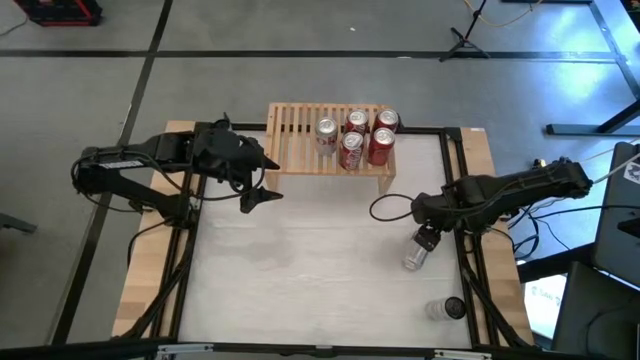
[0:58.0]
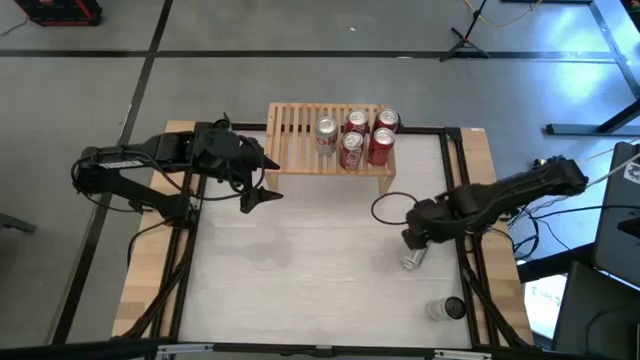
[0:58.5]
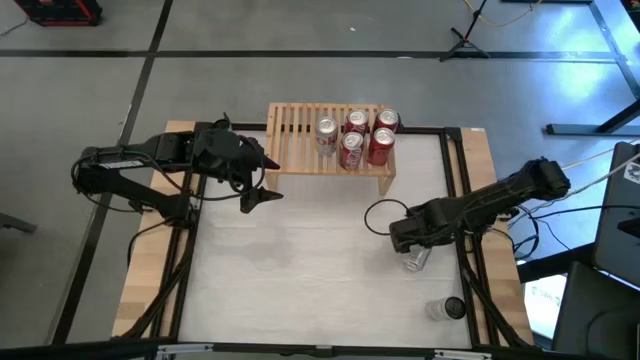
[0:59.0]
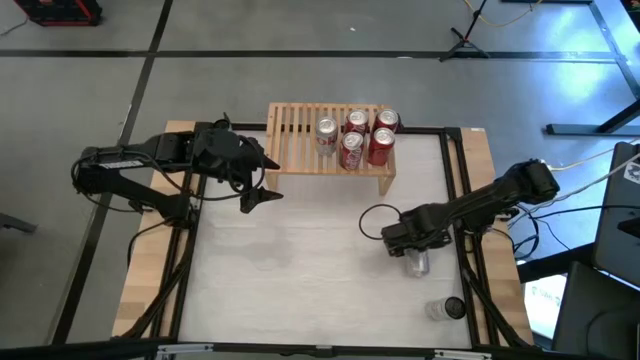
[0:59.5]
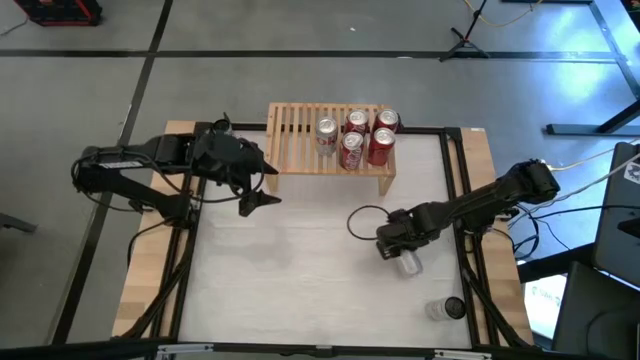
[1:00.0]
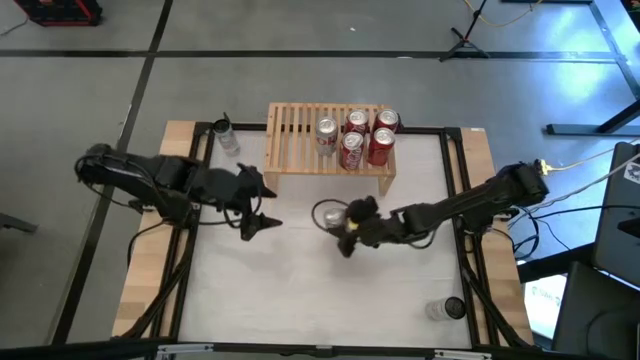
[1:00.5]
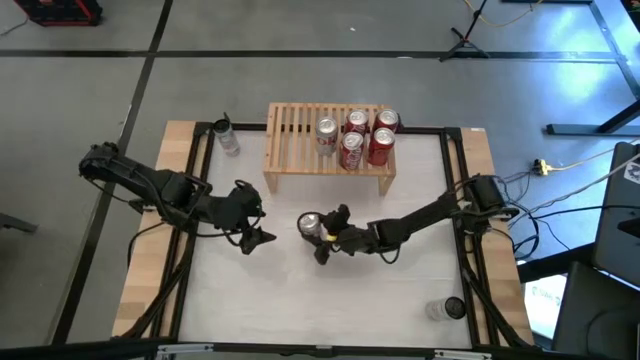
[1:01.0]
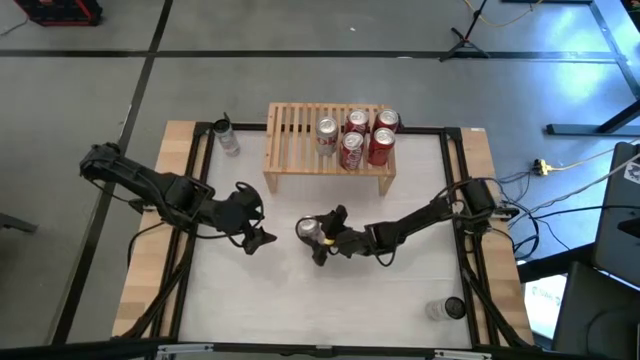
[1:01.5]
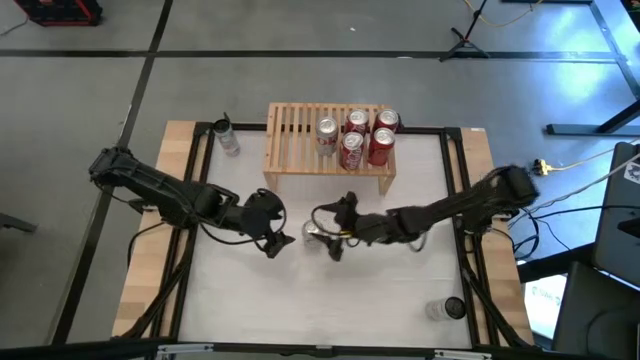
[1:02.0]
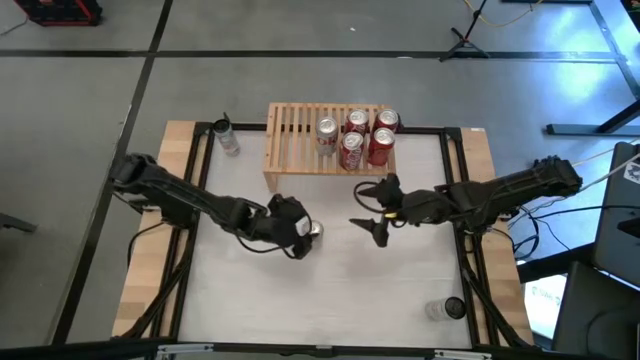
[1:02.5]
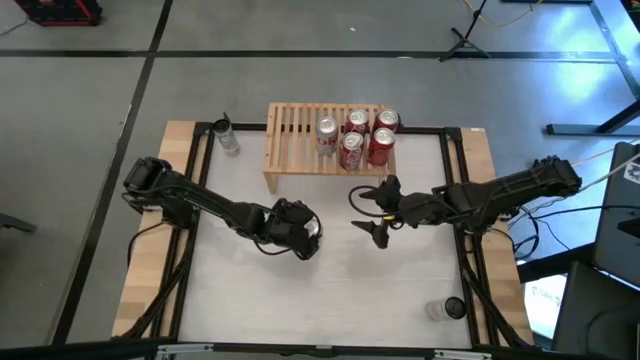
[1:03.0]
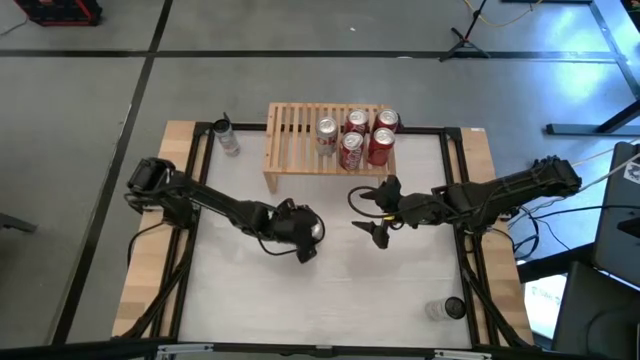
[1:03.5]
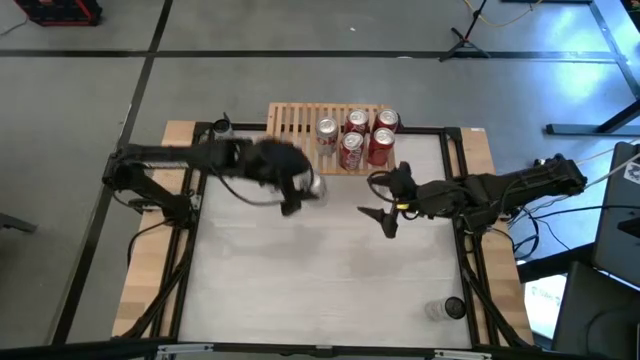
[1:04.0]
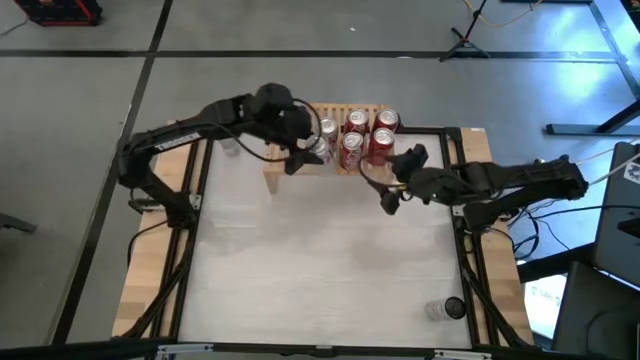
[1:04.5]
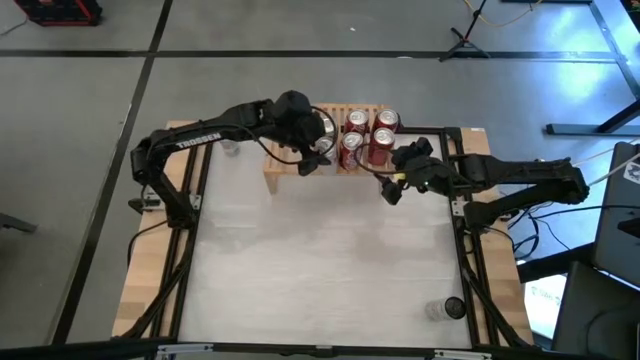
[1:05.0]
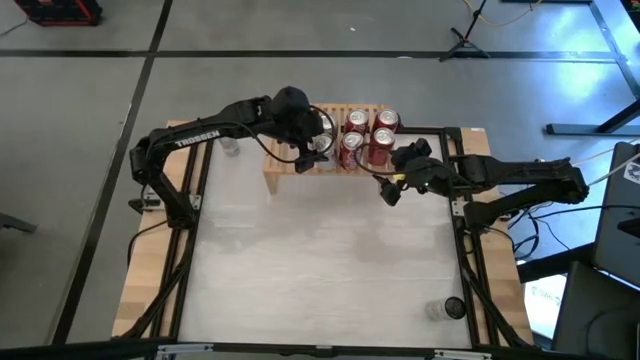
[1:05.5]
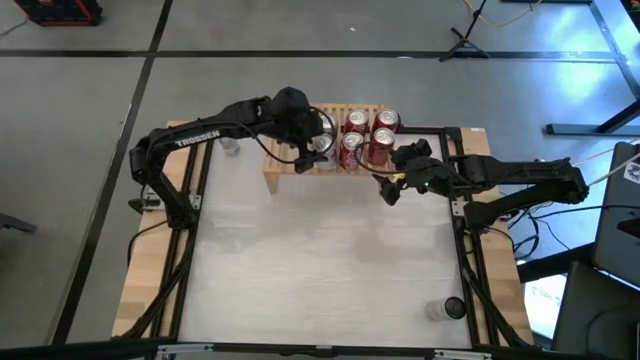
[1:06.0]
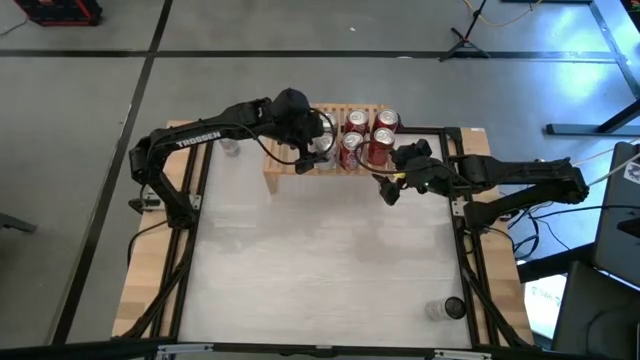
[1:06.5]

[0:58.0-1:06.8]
Task: Place canned beverage on shelf
Put the red silver soda can aligned with the other red silver soda can on the shelf

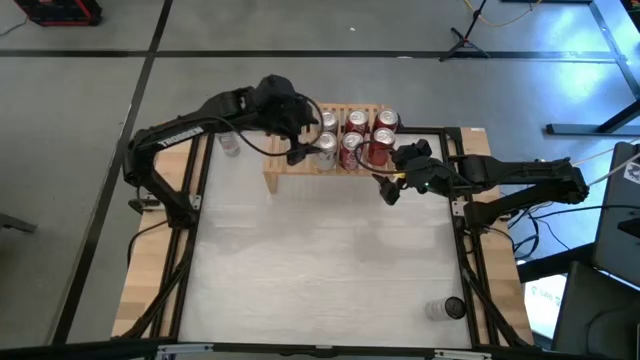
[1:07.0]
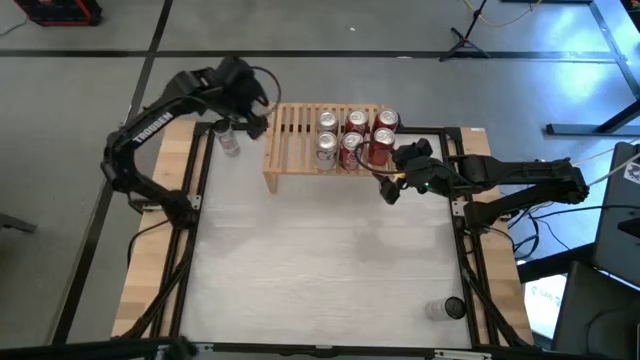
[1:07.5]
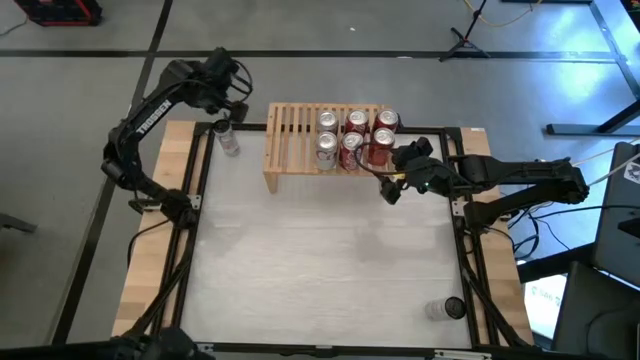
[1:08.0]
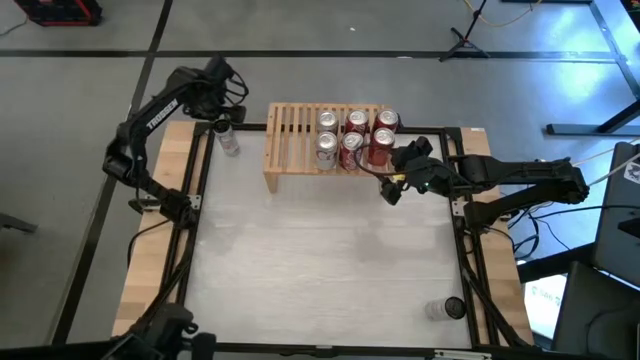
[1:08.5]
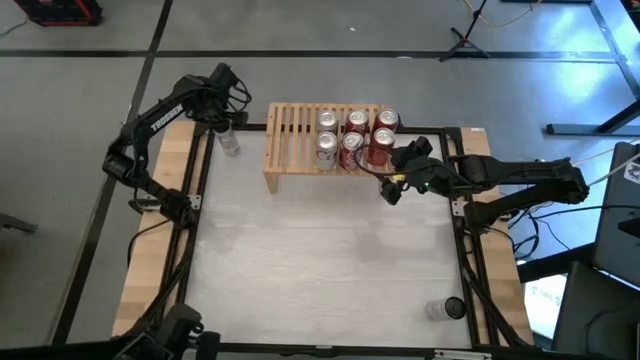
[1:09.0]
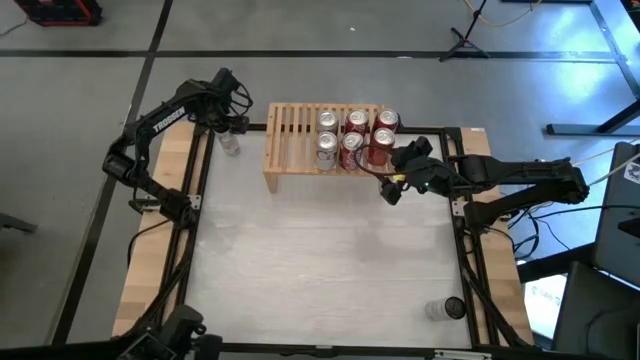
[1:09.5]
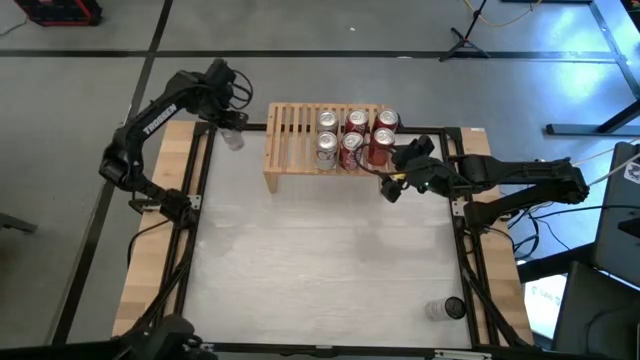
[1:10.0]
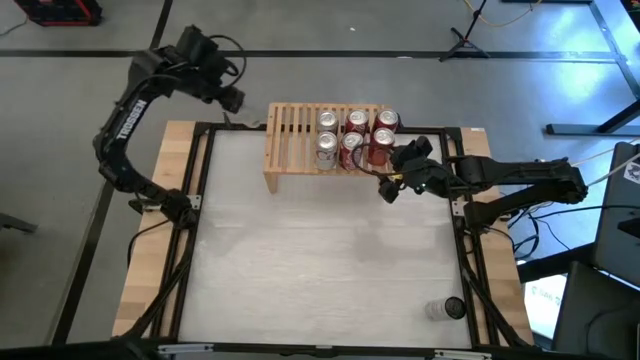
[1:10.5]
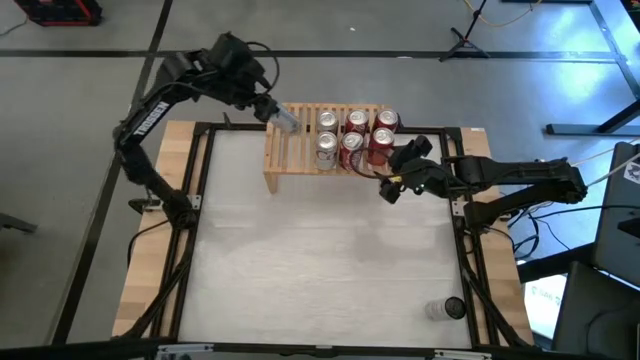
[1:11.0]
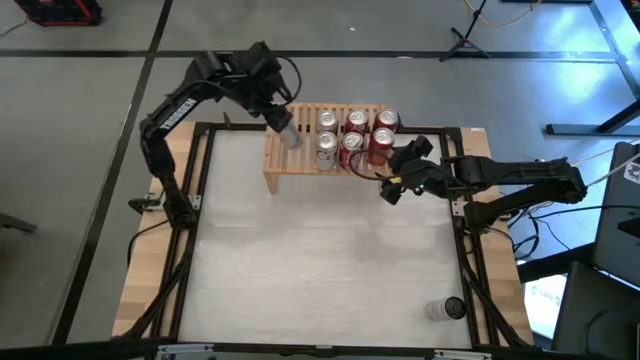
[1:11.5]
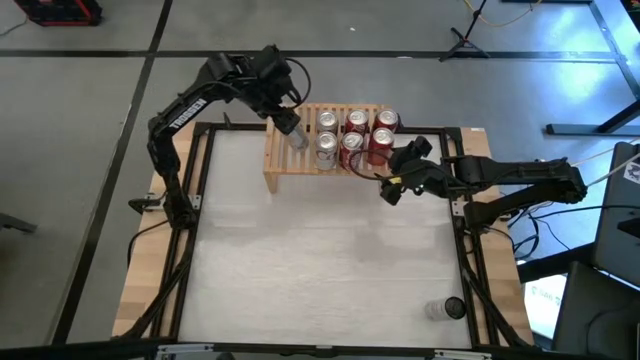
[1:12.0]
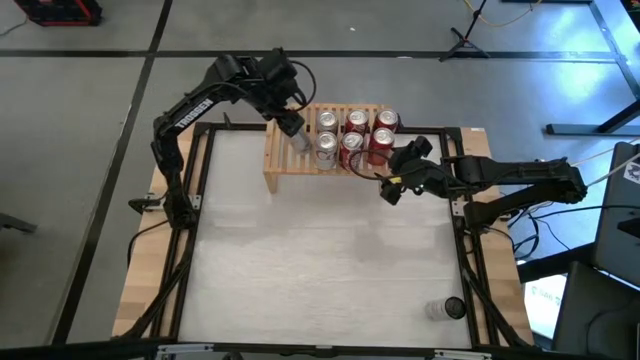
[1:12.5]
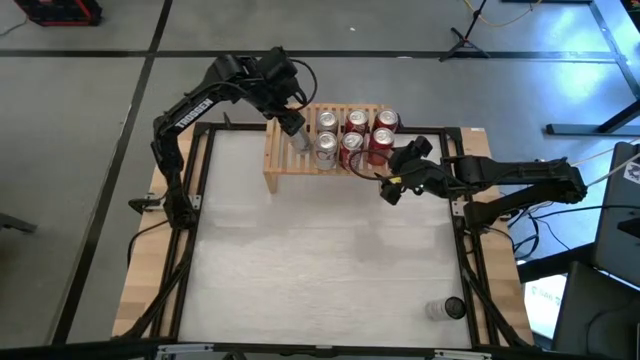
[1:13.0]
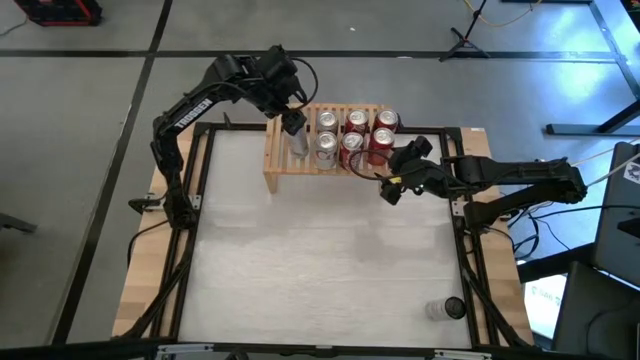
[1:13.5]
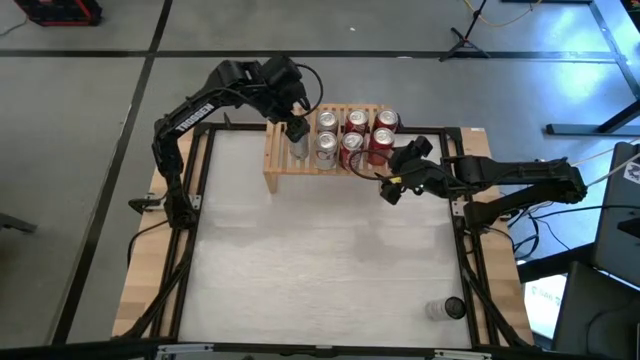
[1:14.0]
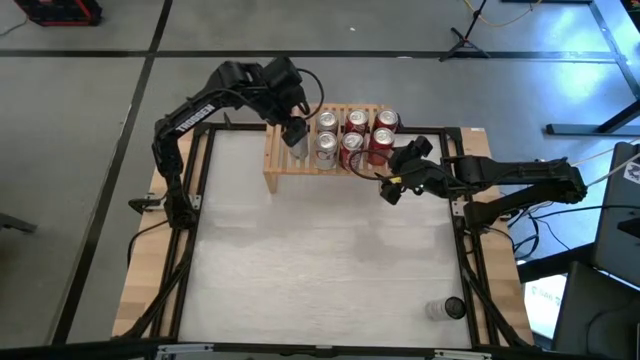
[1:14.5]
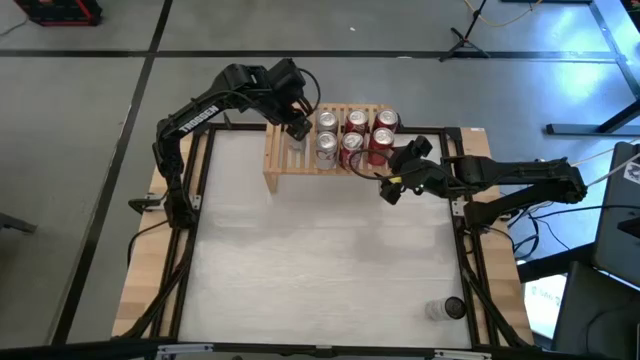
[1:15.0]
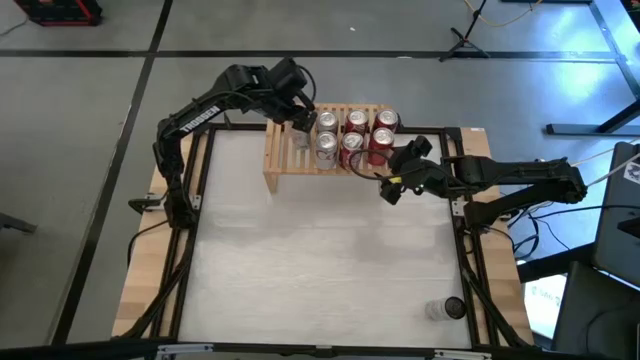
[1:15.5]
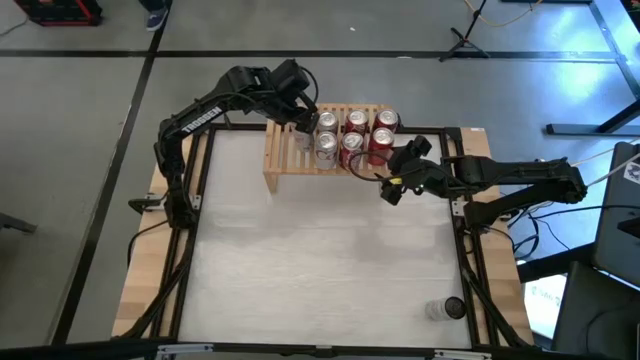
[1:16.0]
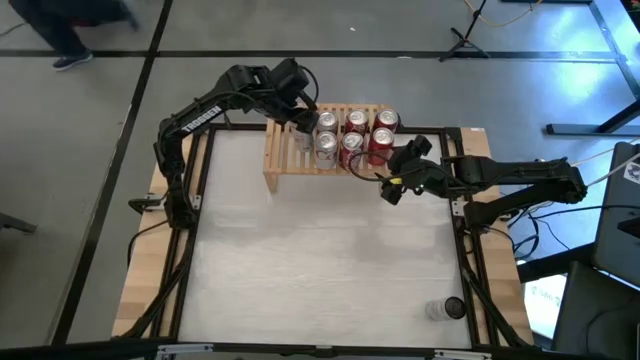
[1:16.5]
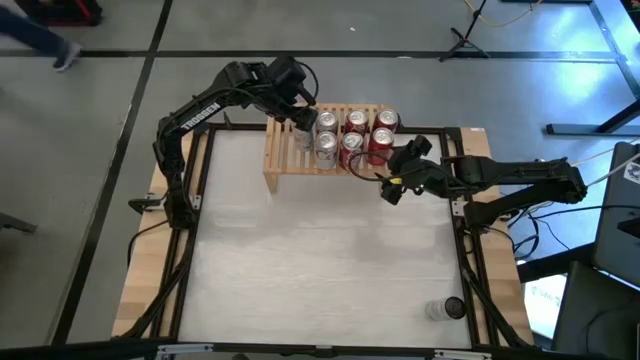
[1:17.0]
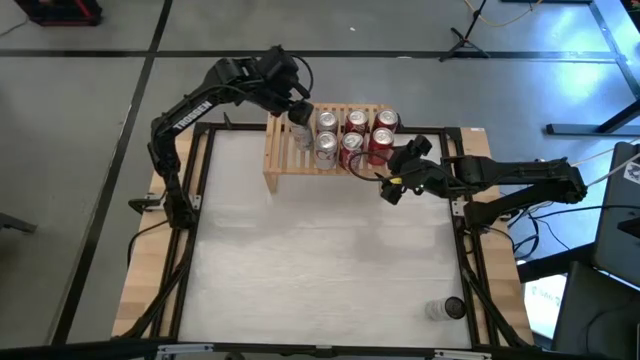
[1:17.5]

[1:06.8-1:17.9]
Put the top white pink soda can on the shelf

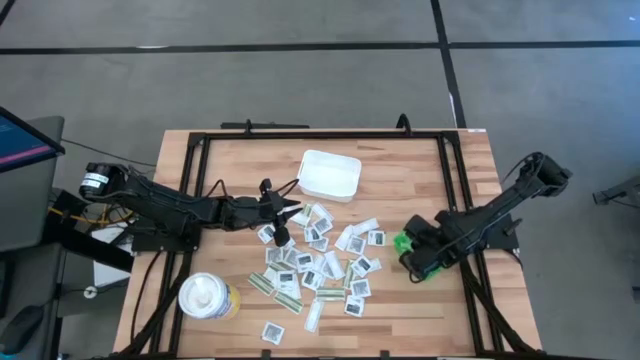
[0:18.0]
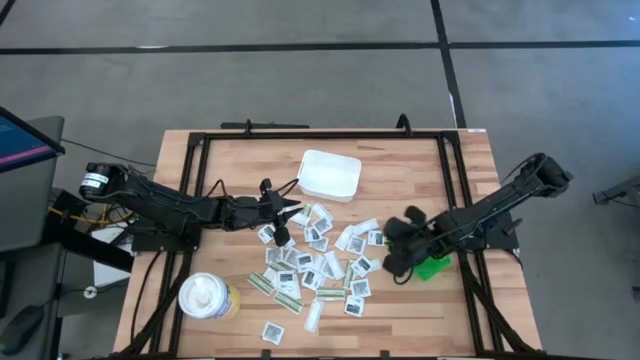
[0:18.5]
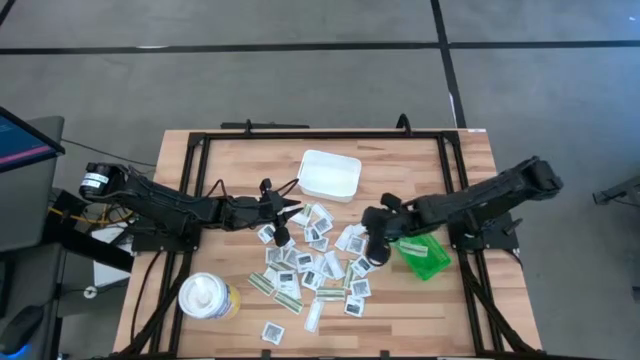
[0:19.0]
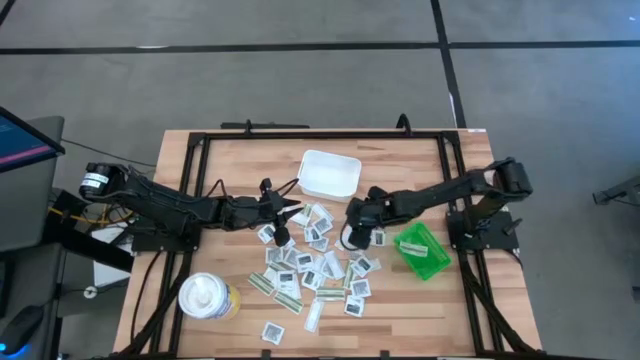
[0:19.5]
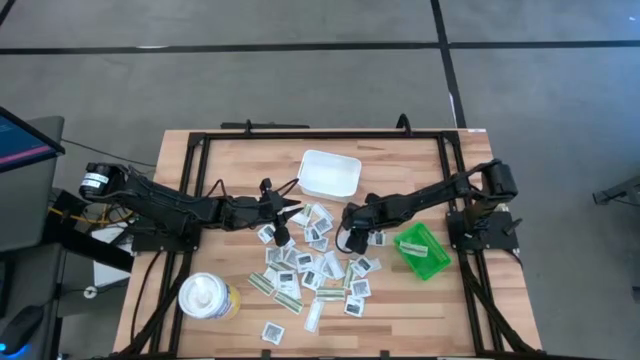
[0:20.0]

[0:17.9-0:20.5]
Task: Pick & Place First Aid Supplies
Put the bandage pack into the green bin
